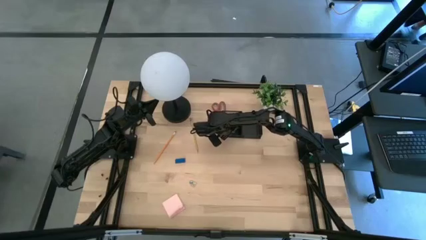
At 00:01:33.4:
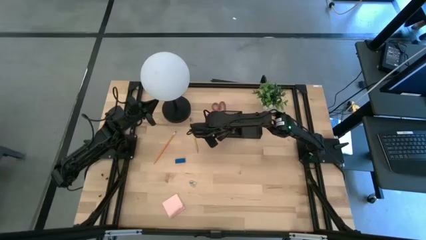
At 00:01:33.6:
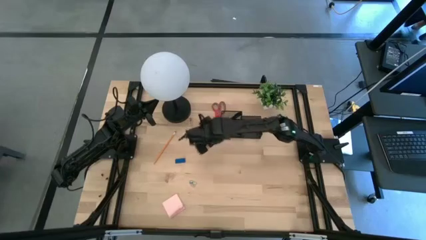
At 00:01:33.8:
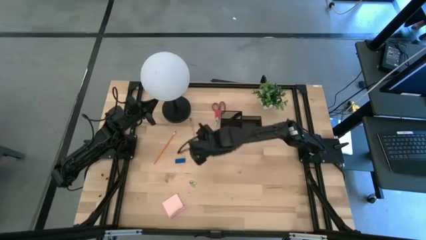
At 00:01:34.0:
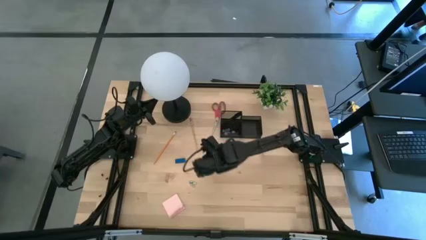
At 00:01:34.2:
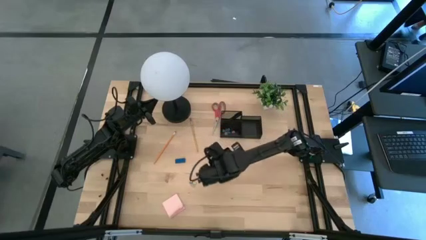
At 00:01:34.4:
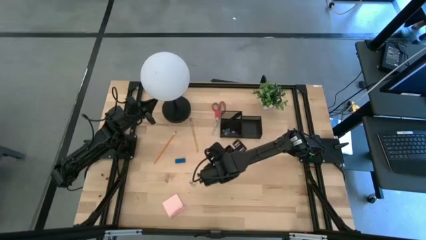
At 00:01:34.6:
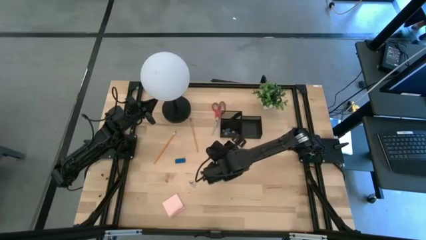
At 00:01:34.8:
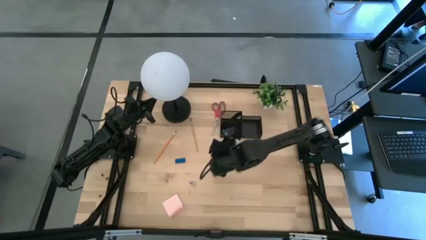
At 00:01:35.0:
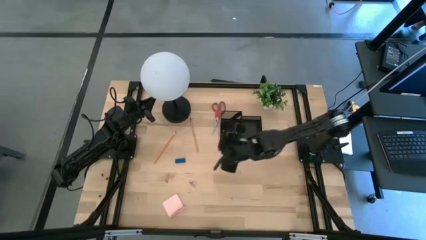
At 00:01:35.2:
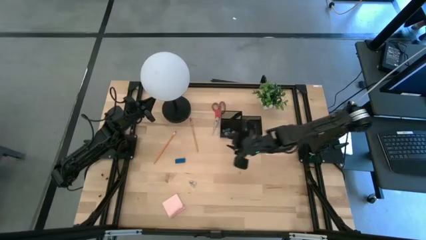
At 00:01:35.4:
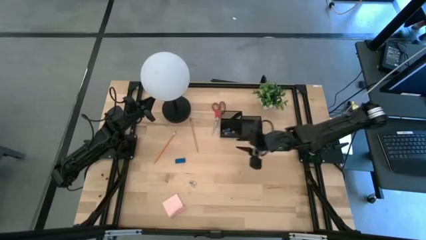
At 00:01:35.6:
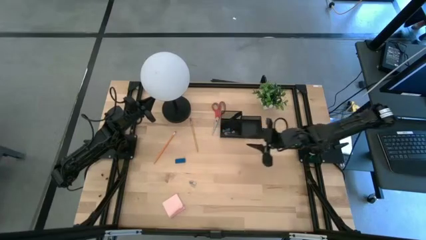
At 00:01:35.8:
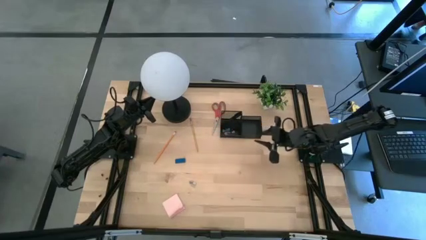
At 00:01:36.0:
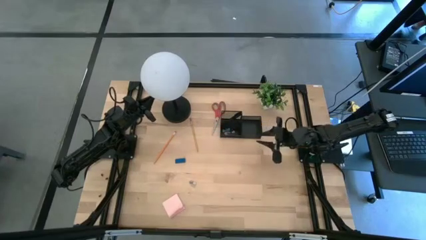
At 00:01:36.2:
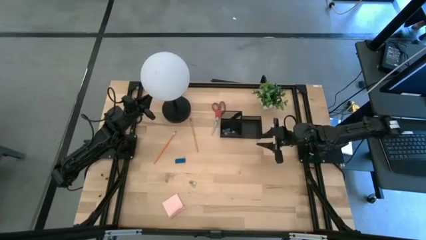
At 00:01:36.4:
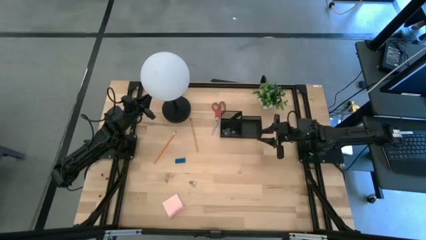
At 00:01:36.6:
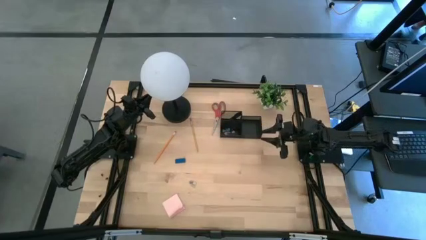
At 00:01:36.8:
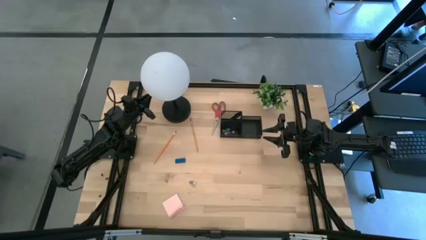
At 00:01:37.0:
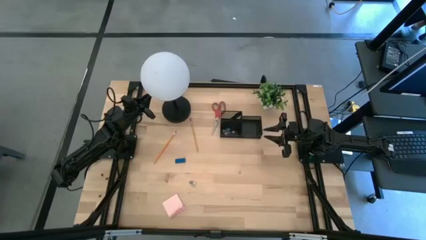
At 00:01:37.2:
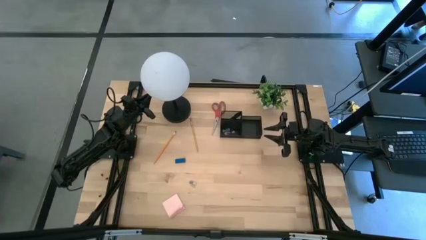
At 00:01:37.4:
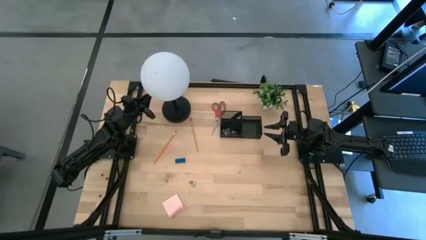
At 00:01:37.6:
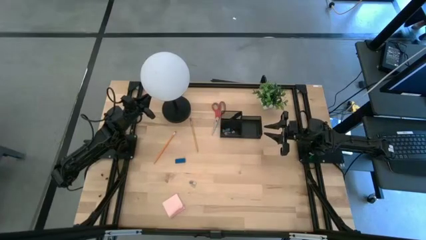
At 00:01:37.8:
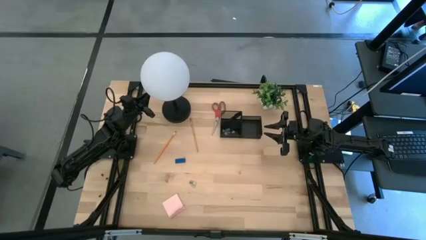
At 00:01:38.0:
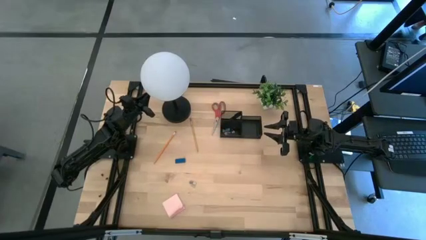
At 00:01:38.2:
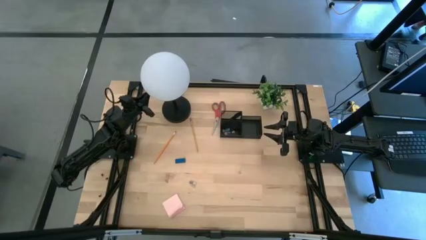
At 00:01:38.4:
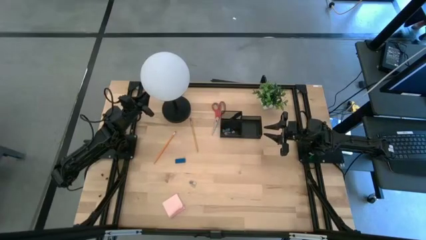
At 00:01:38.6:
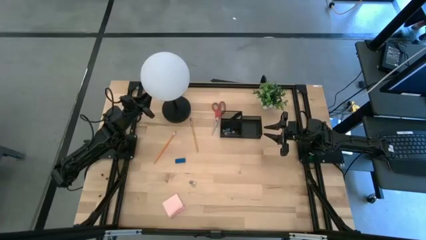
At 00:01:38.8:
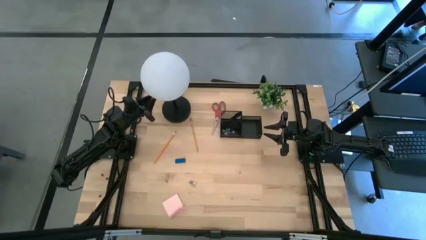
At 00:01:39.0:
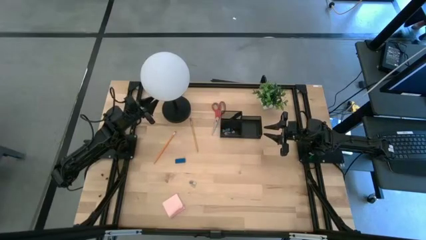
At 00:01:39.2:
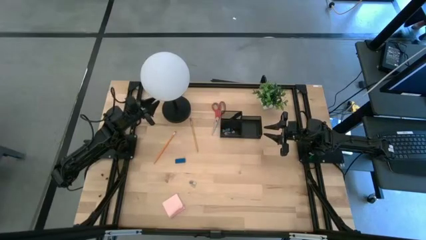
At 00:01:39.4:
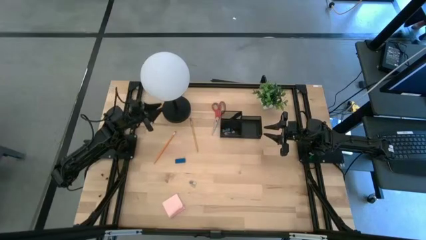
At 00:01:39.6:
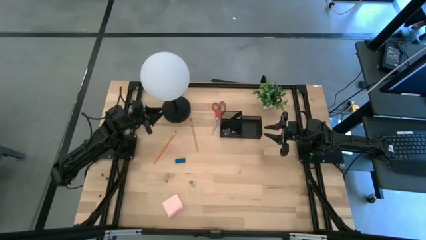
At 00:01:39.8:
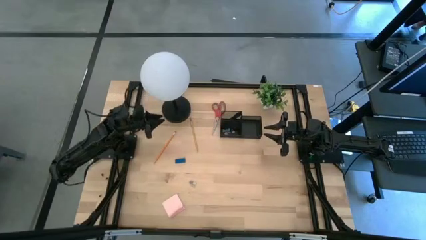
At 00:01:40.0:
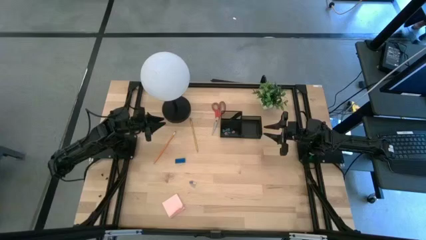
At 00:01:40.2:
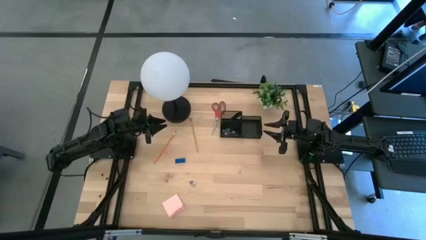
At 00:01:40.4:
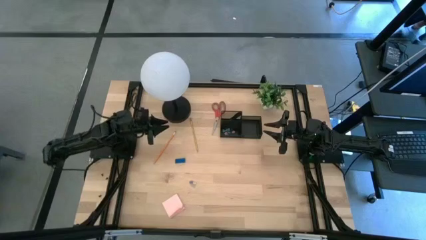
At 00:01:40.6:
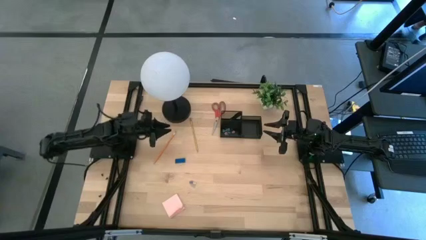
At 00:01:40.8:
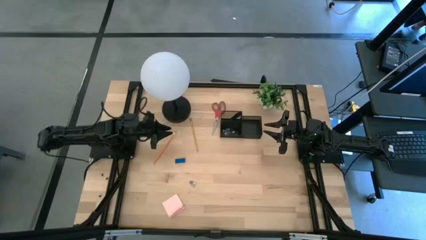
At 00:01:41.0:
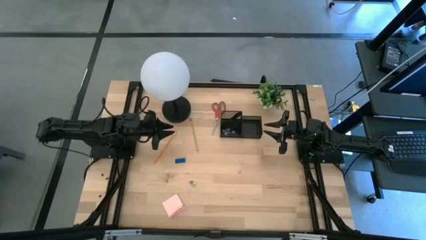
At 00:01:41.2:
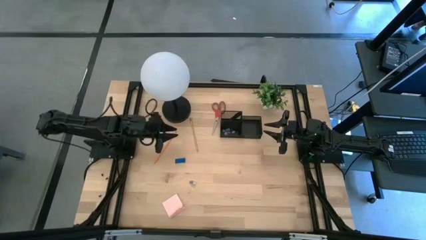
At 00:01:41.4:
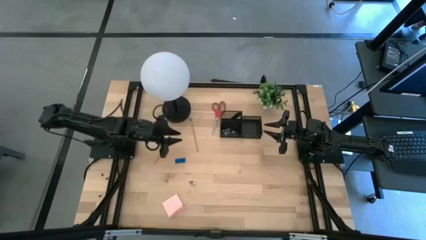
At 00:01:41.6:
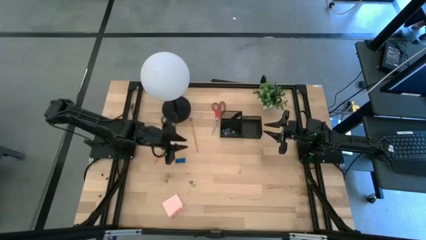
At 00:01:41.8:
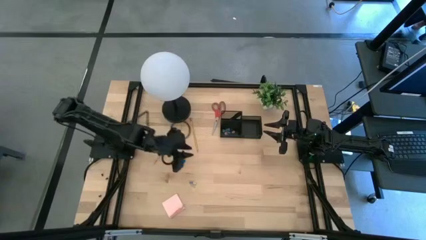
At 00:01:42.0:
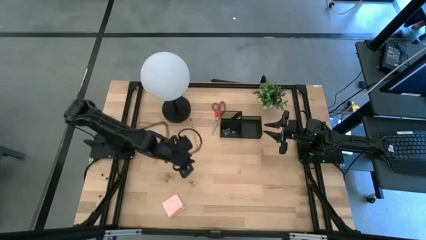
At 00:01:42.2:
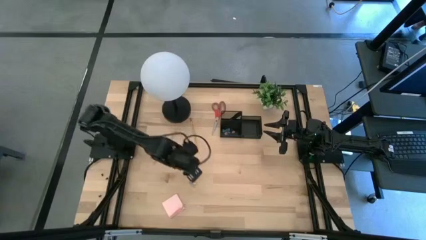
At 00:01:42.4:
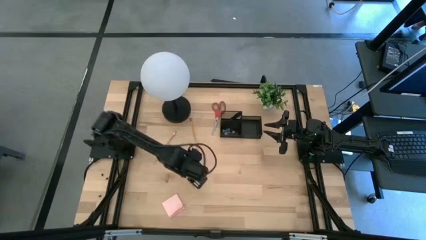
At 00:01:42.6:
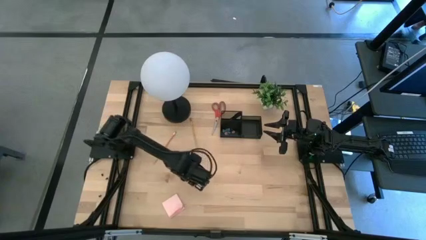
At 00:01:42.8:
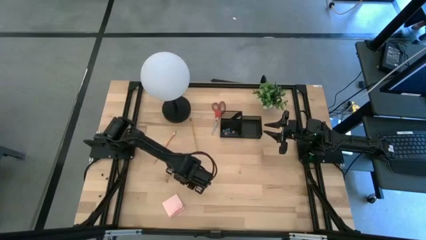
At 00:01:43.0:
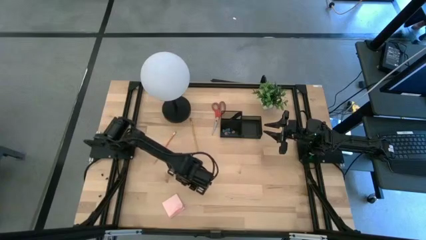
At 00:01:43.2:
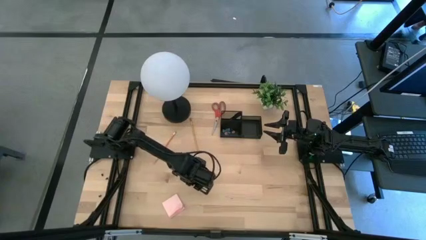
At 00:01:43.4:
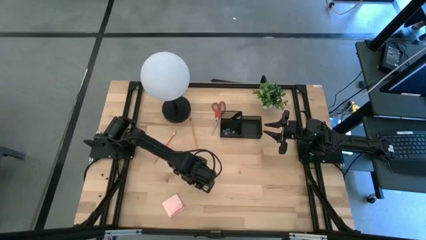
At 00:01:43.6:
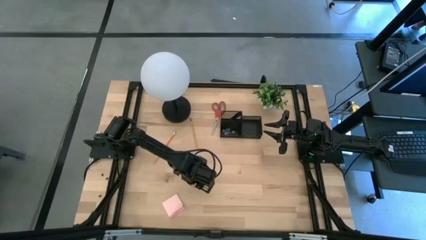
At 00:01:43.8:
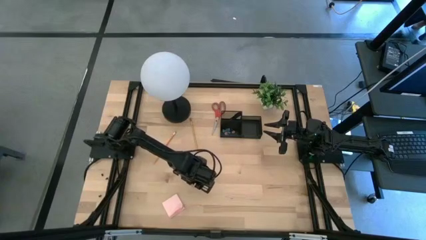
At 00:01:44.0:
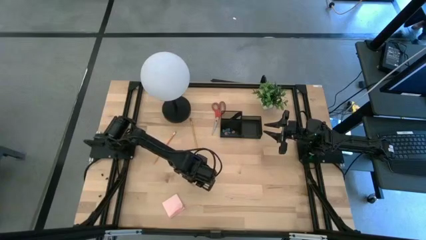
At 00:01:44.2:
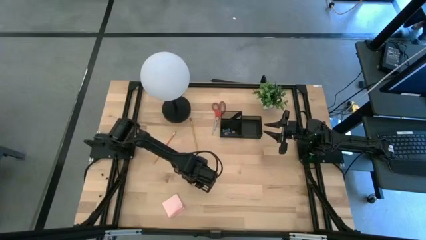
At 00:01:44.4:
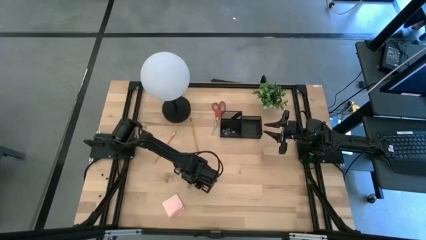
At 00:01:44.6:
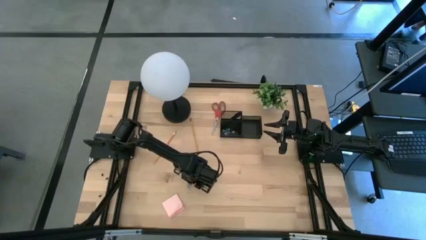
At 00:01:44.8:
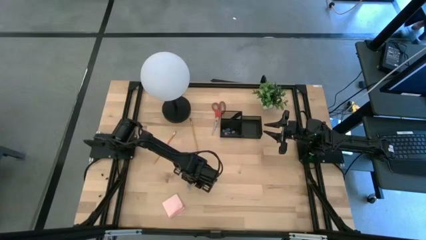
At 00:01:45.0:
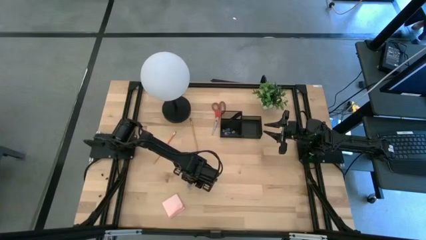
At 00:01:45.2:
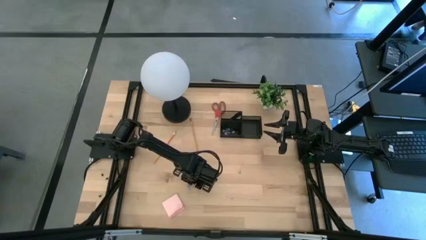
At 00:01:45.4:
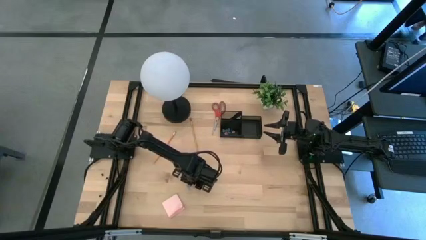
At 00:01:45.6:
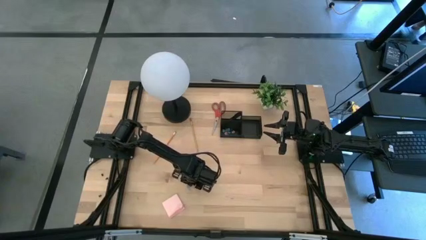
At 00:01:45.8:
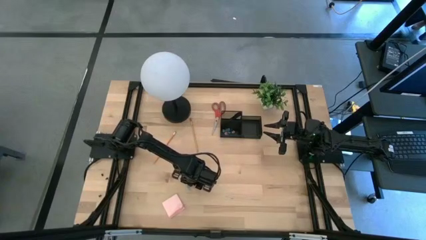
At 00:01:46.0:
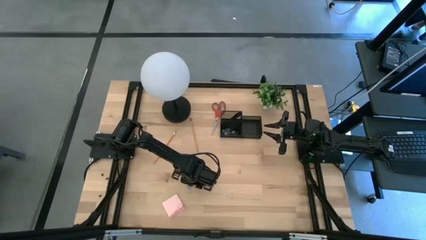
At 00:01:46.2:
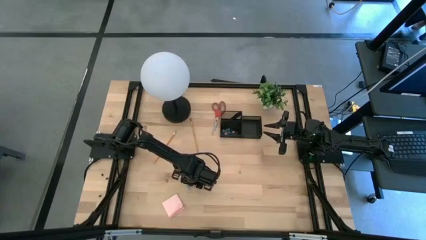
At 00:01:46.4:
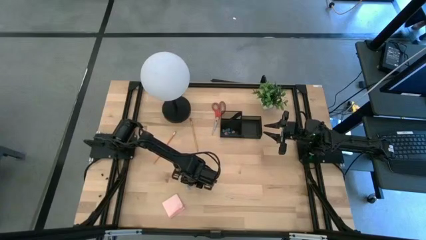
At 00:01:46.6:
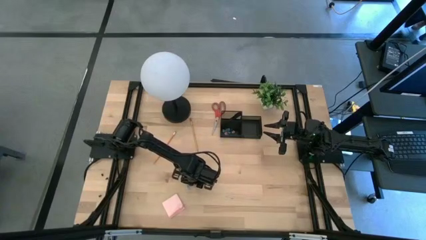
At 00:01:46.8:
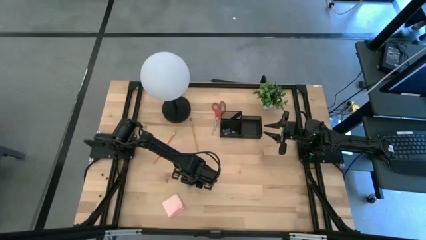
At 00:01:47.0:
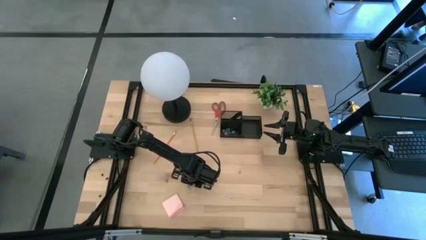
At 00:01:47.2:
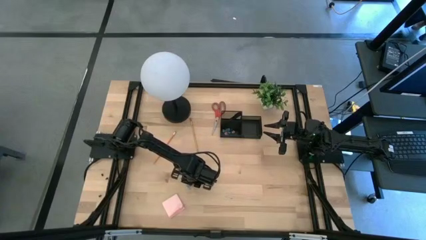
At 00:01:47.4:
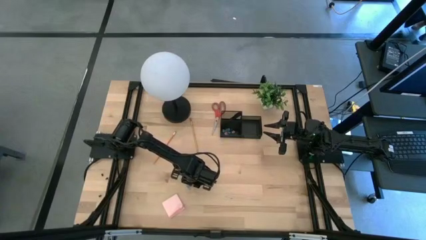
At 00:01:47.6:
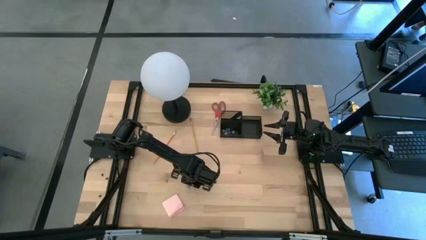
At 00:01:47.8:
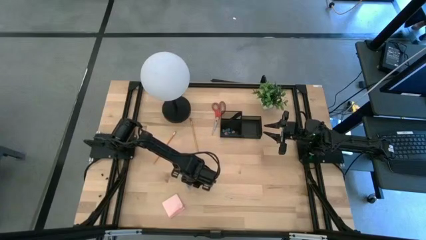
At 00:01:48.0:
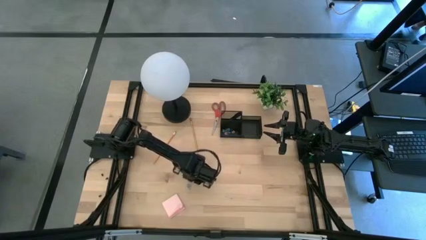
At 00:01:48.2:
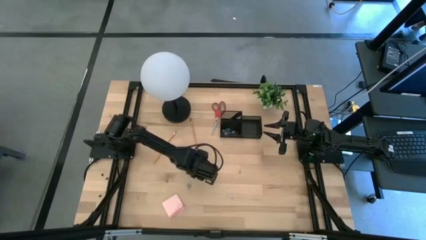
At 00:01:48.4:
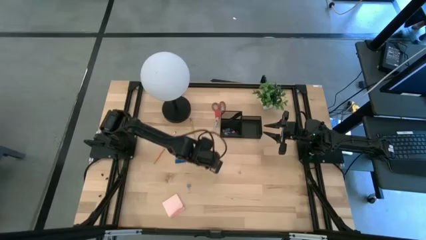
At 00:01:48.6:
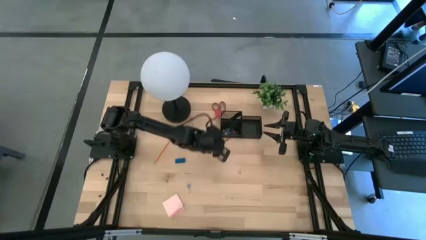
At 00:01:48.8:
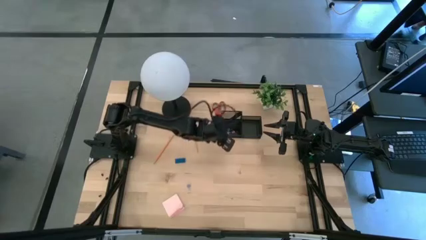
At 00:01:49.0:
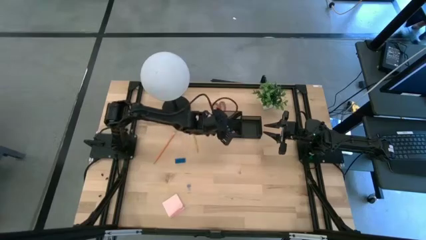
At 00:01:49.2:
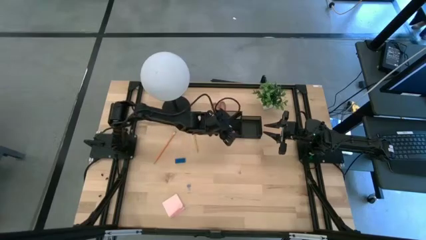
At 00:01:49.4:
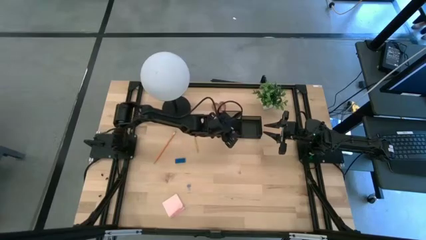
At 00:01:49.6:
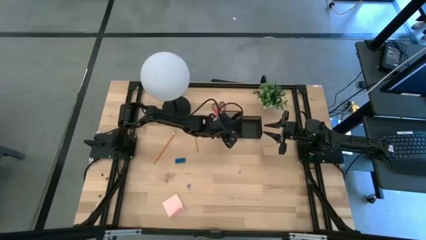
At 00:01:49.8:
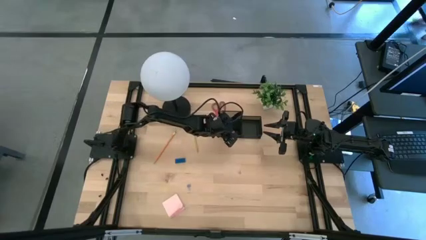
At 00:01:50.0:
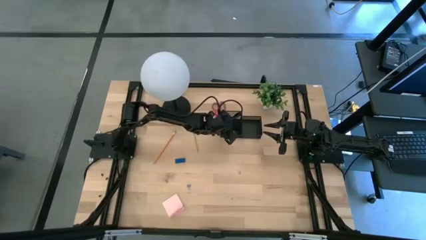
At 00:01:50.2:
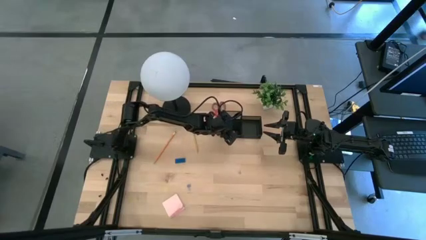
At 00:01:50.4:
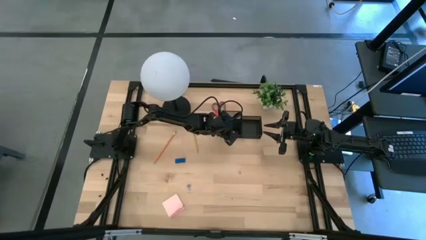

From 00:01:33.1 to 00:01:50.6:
Task: Pick and place office supplies into organizer
Put the gold clip binder into the black desk organizer
